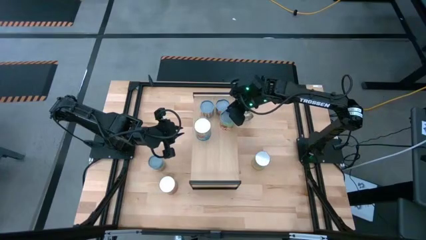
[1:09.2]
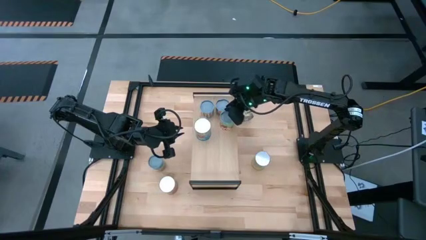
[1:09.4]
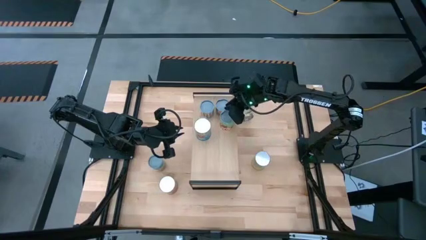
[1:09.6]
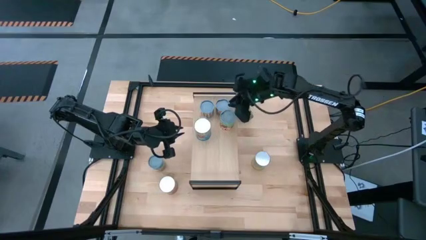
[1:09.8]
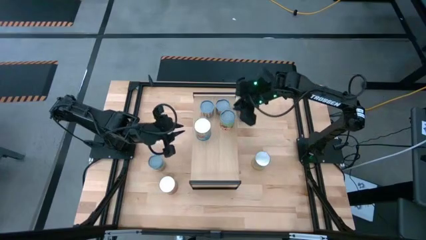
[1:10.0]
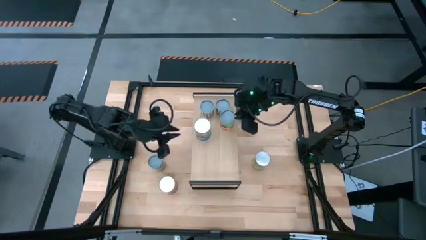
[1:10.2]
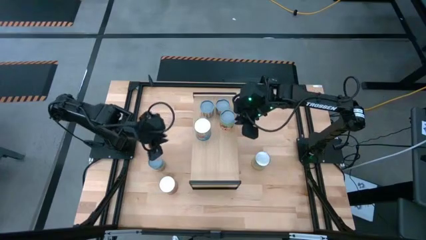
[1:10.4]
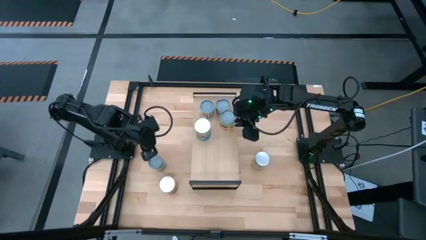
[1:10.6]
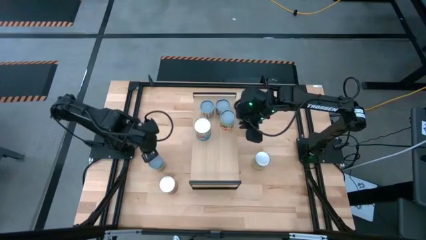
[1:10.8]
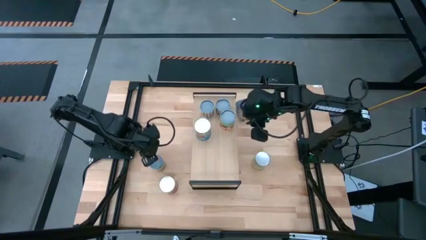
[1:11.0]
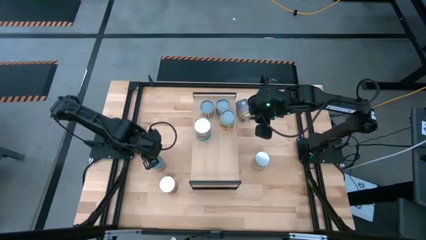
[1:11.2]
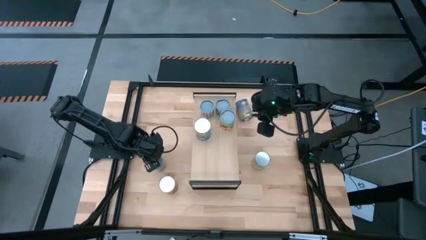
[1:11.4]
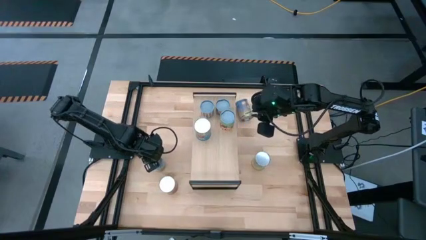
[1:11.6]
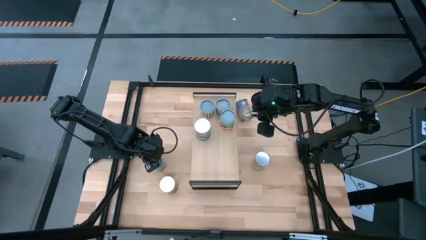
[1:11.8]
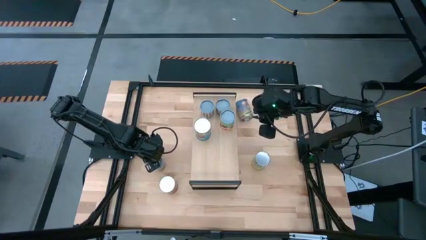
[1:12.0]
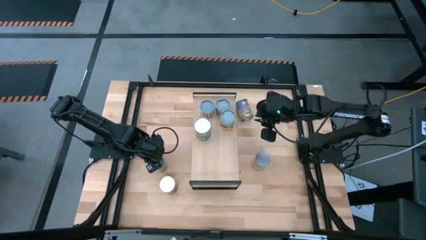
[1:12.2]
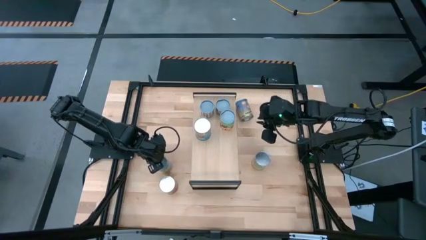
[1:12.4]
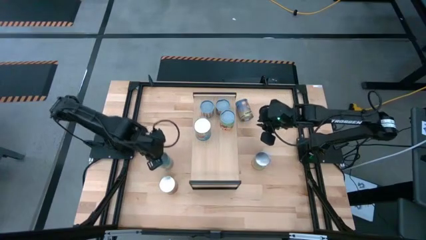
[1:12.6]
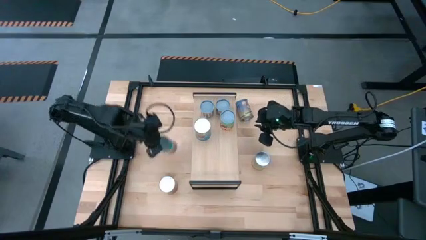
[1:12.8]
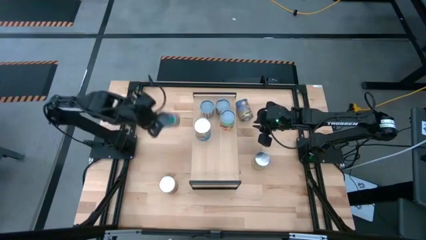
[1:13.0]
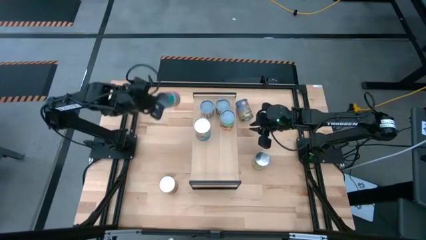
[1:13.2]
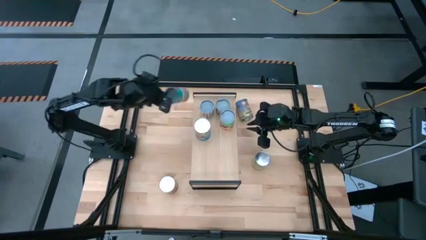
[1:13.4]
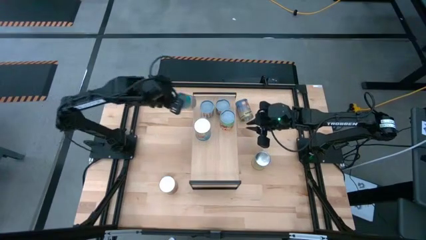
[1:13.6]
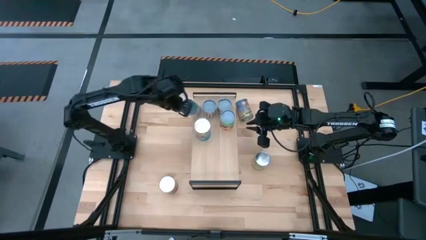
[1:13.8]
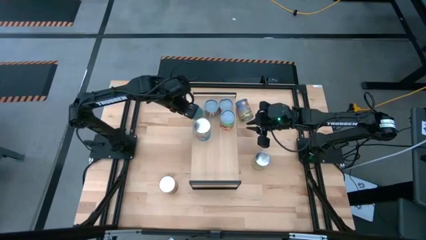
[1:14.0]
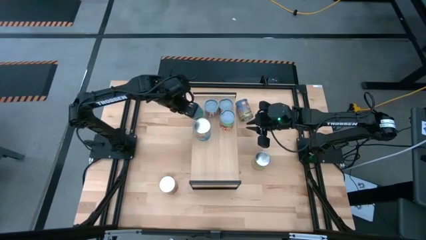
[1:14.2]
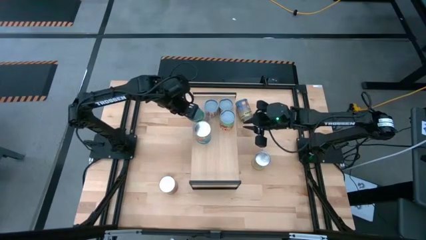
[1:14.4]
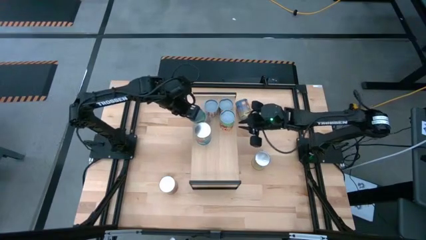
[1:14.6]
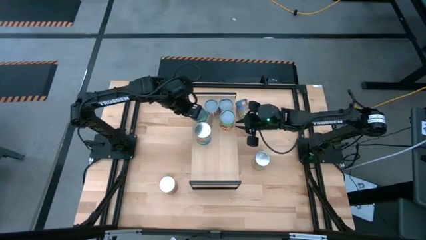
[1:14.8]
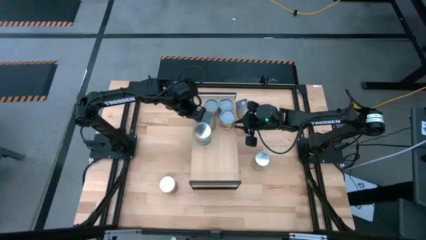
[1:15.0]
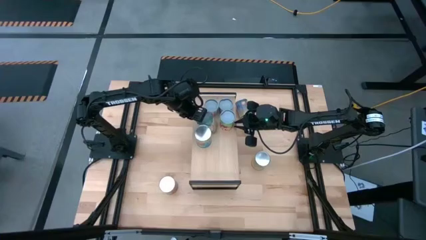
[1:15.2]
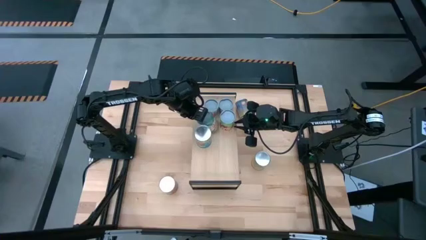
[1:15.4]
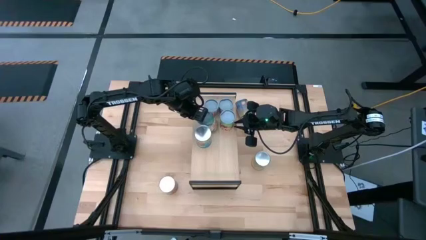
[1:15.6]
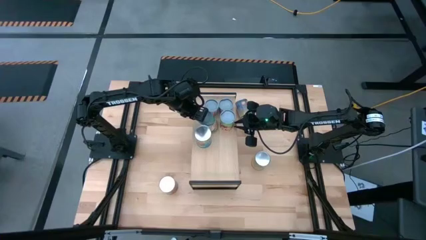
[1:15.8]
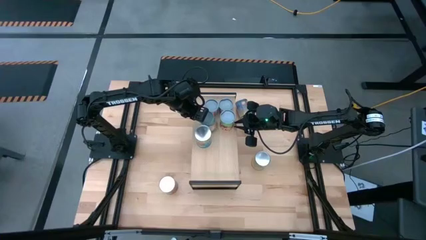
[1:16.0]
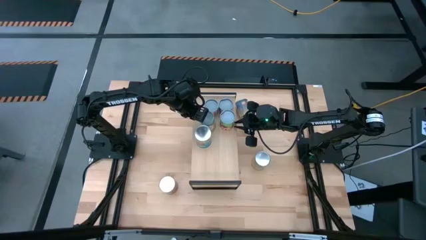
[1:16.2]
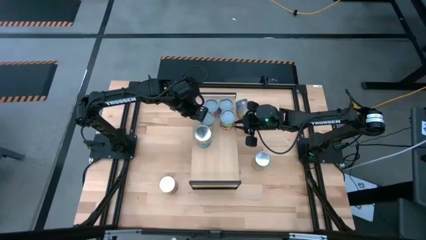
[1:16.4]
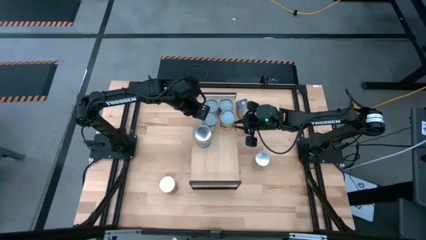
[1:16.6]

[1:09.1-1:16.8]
Task: Pick and place cans onto a shelf
Put the canned fruit on the shelf

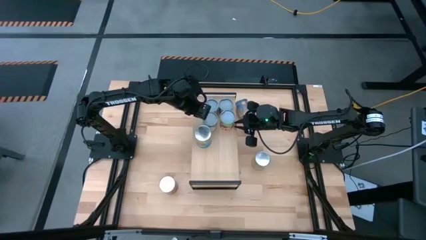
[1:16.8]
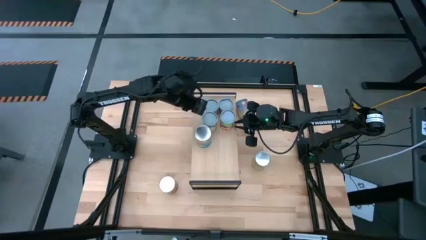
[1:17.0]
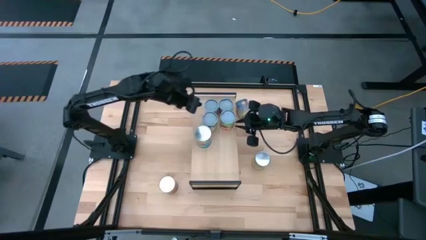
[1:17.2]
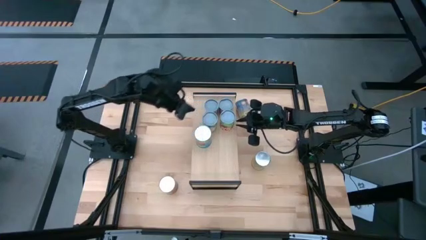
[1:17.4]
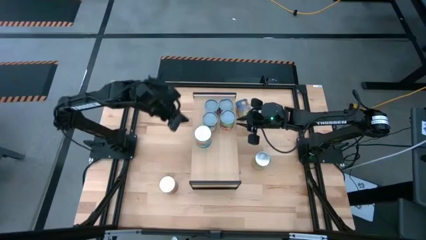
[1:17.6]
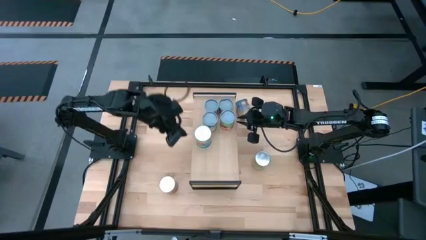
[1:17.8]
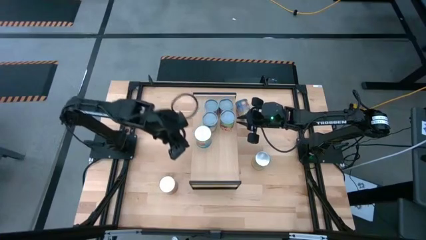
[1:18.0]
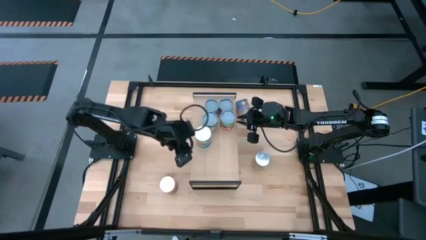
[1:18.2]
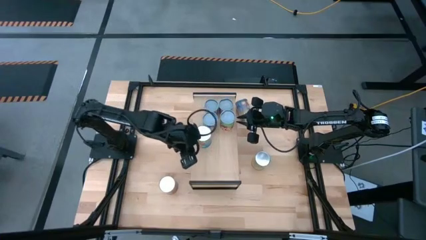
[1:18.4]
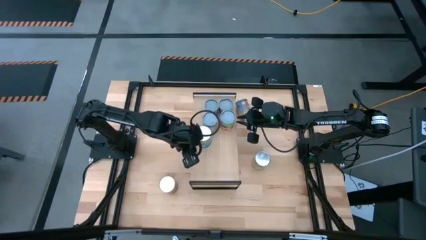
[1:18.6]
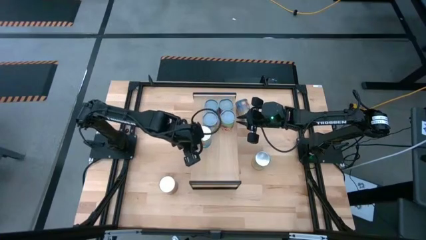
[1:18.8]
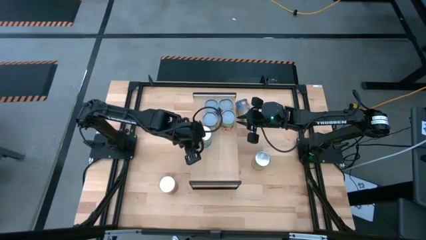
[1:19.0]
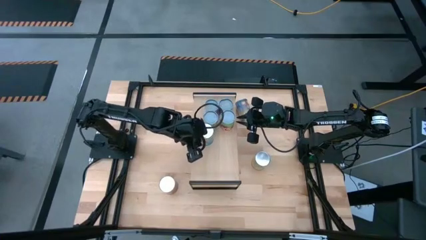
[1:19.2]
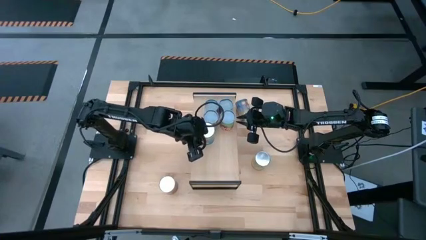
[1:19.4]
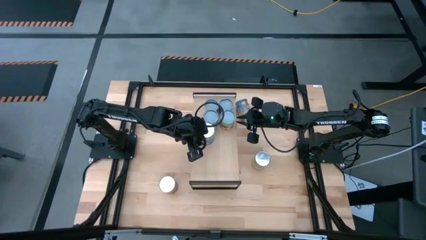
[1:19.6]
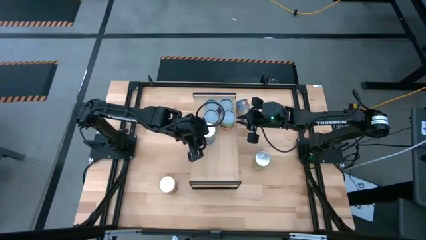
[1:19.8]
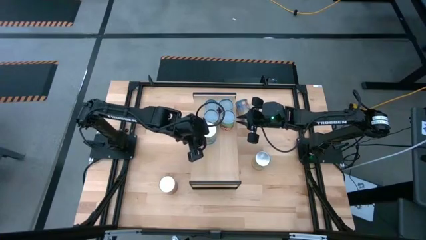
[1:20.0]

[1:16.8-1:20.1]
Adjust the canned tomatoes on the shelf

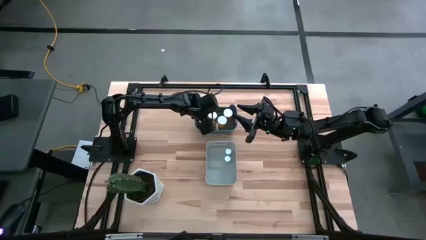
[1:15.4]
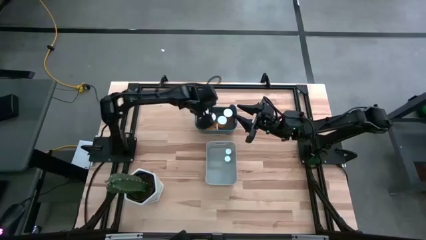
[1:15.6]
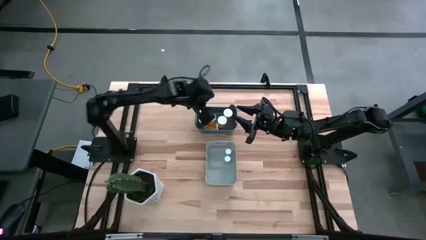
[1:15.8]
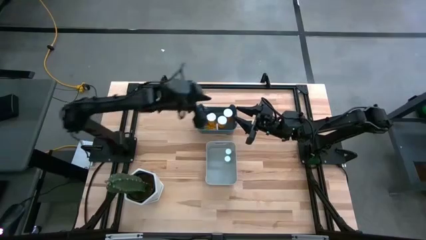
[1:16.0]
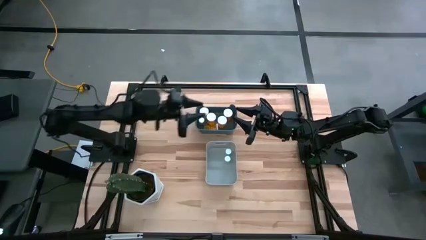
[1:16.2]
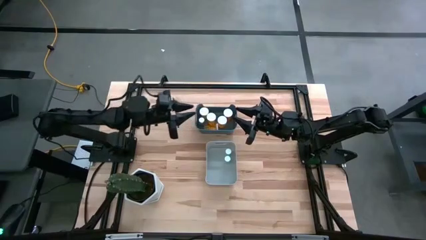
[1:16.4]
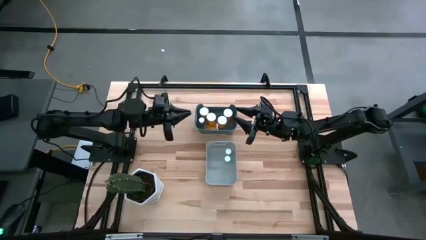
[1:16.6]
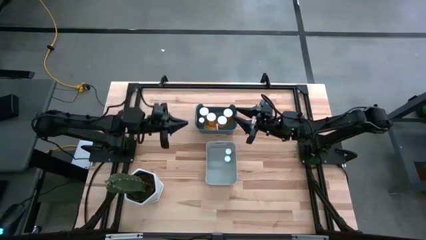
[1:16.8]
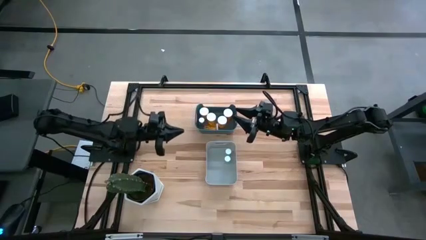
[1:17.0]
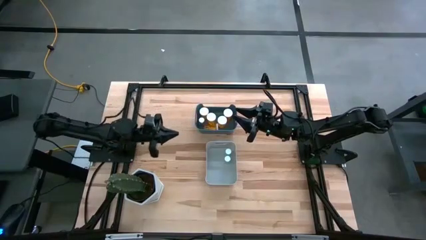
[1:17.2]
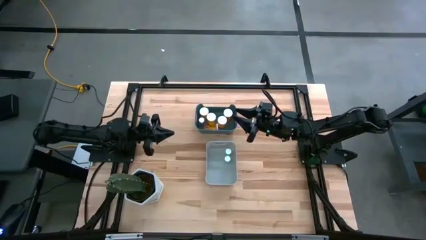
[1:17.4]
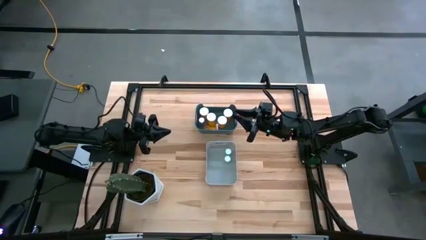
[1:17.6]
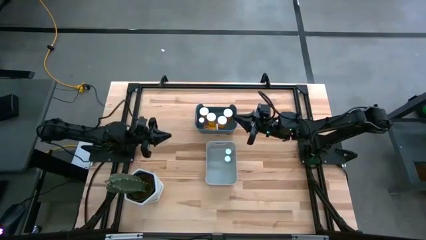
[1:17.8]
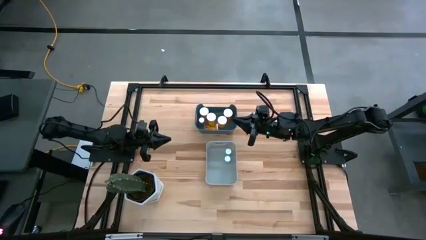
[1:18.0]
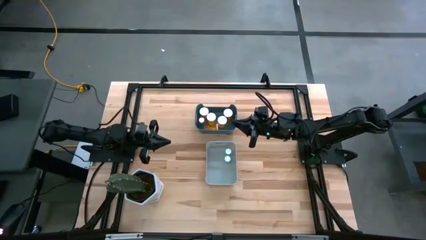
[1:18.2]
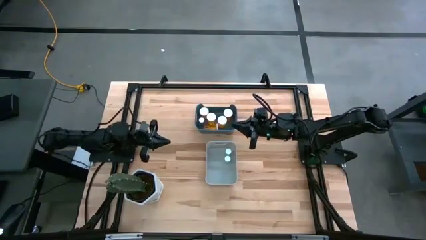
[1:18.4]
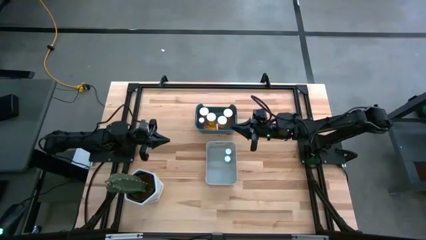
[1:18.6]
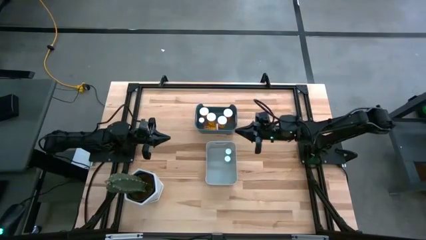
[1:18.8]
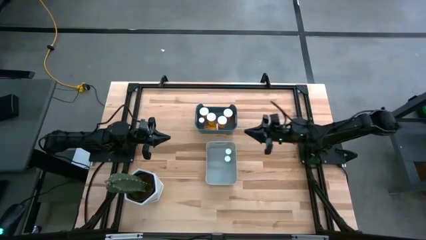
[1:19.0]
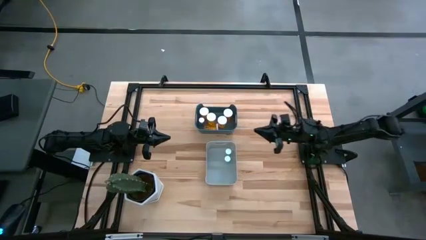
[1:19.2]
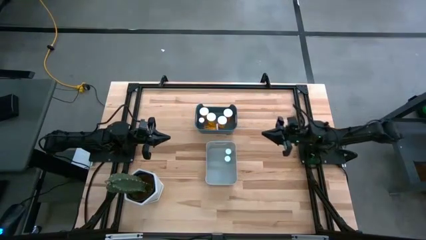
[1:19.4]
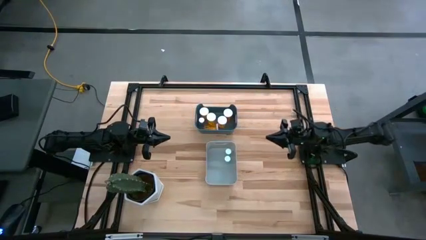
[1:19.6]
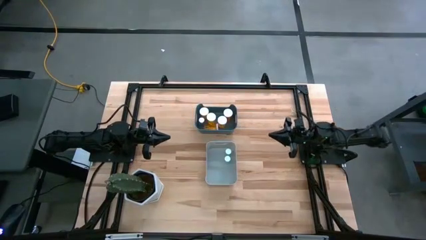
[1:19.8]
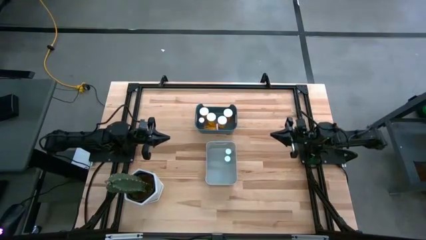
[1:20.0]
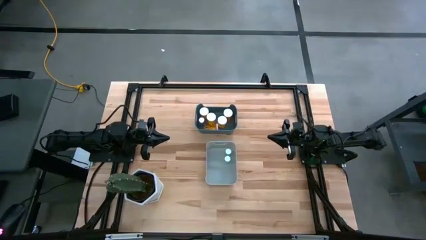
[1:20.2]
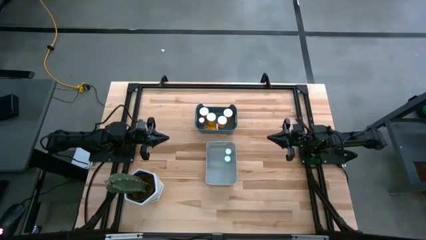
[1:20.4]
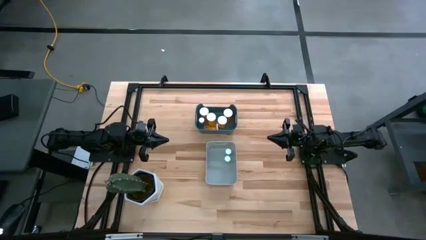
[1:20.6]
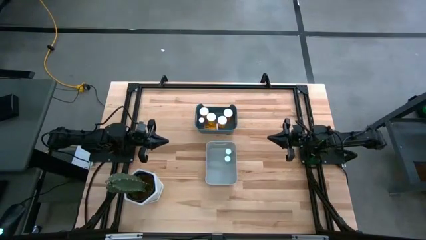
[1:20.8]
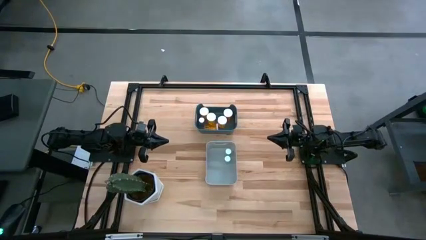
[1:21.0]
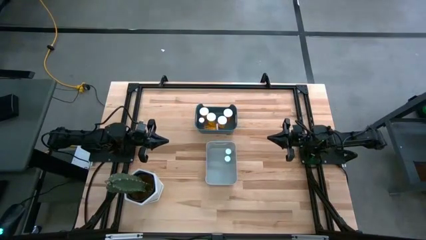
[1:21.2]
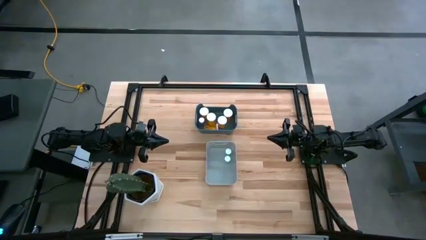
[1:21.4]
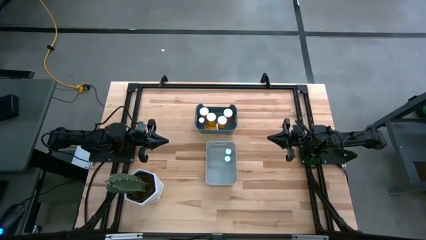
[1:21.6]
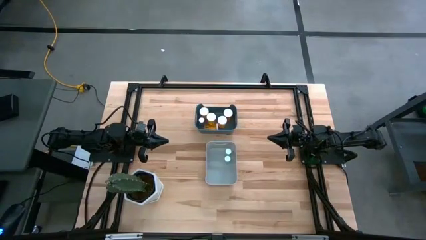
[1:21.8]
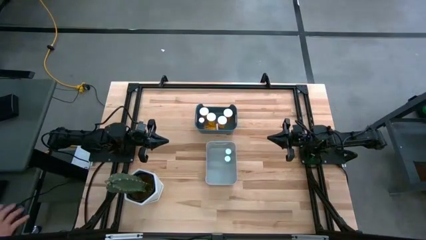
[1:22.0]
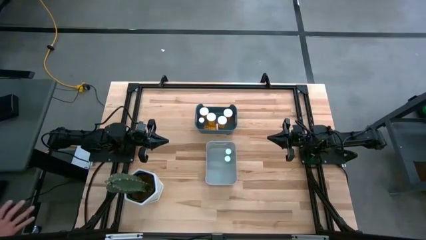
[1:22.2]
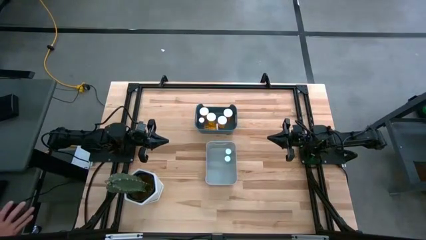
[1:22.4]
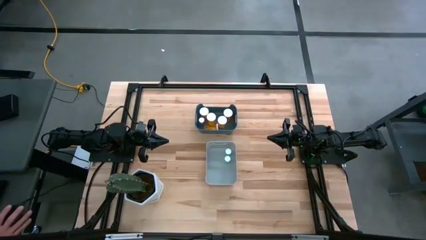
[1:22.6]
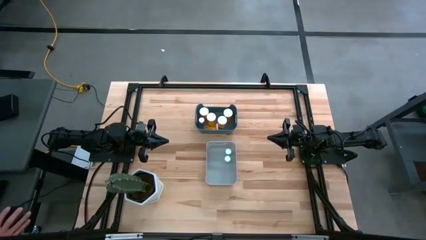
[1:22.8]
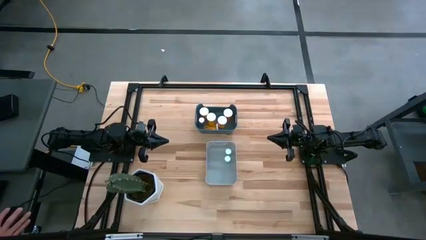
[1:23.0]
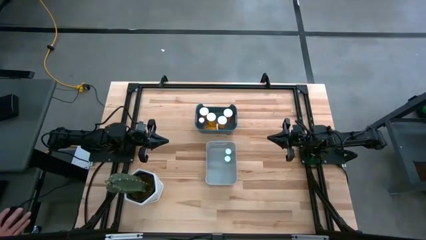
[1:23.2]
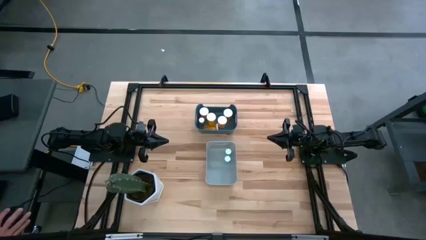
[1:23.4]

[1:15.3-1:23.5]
Task: Pick and place medicine bottles into bin by pill shape (circle, oval)
Return to Home Position
